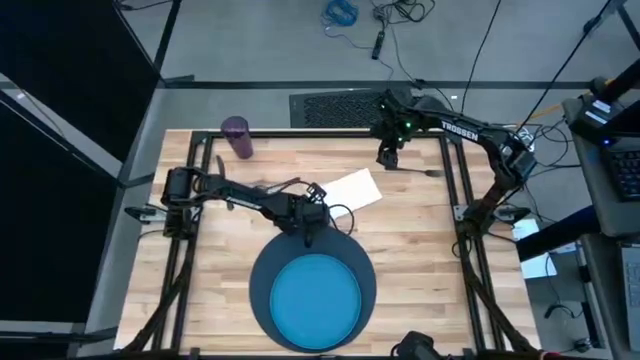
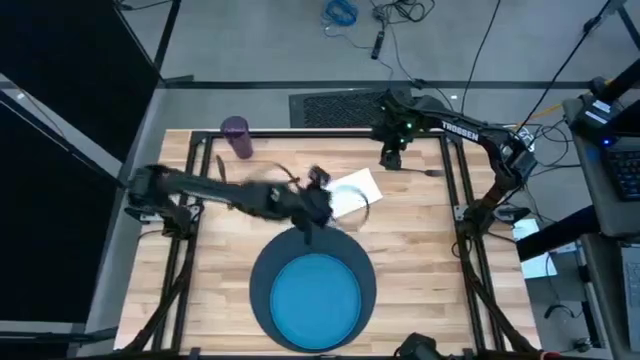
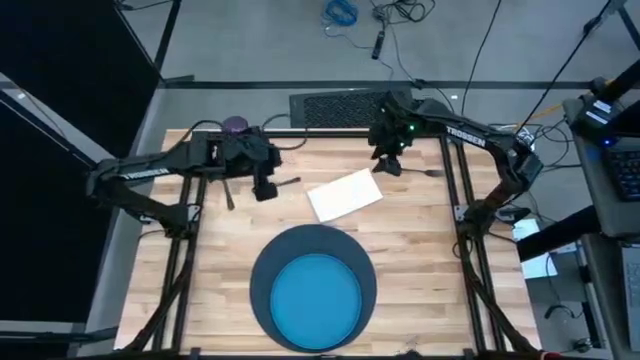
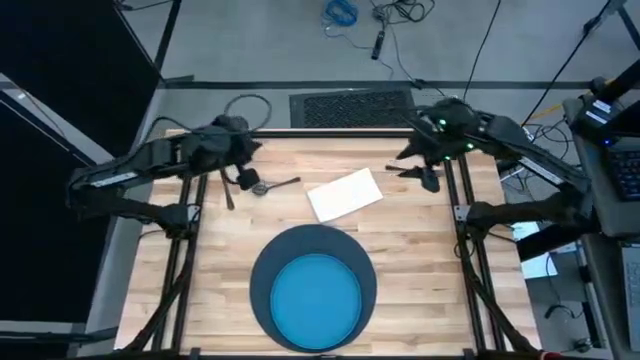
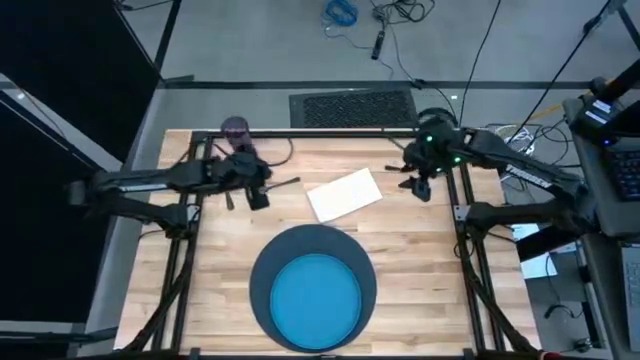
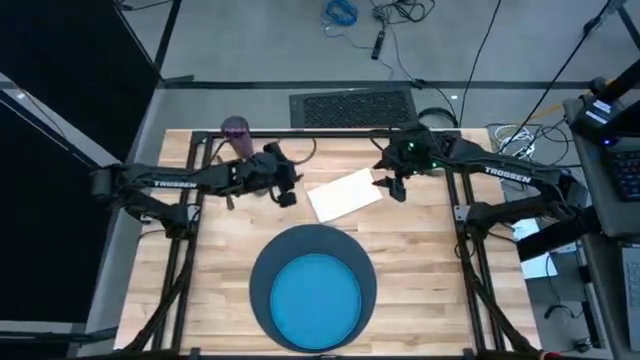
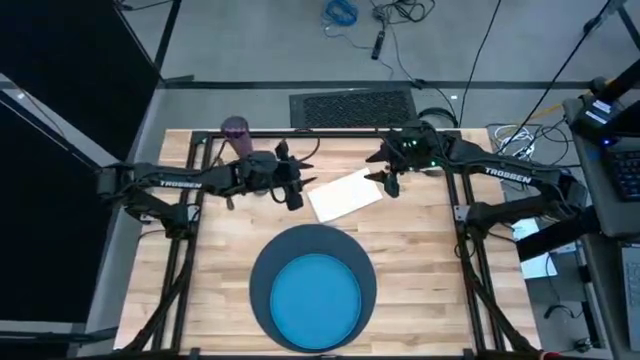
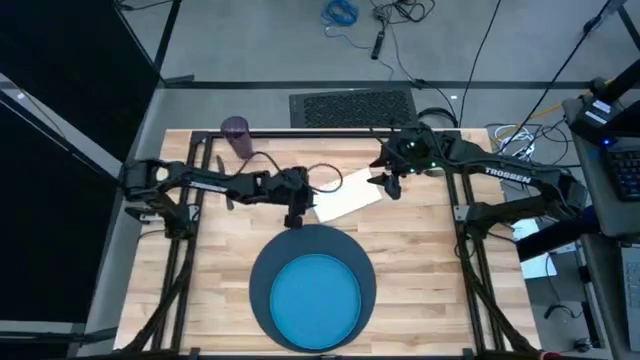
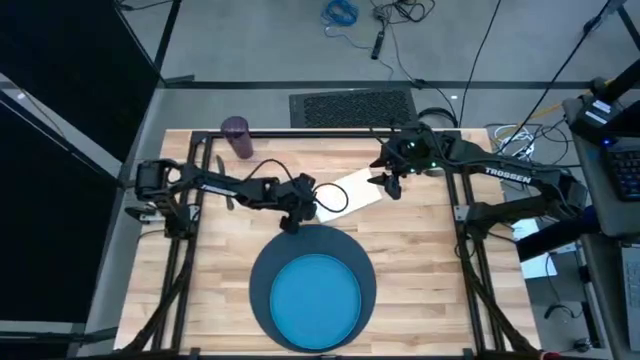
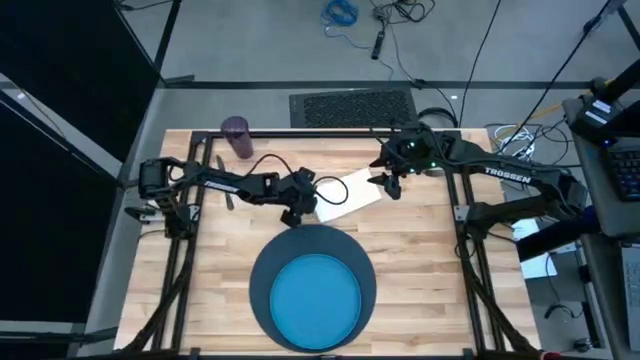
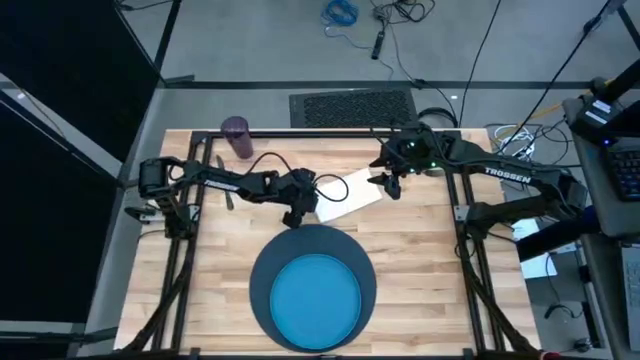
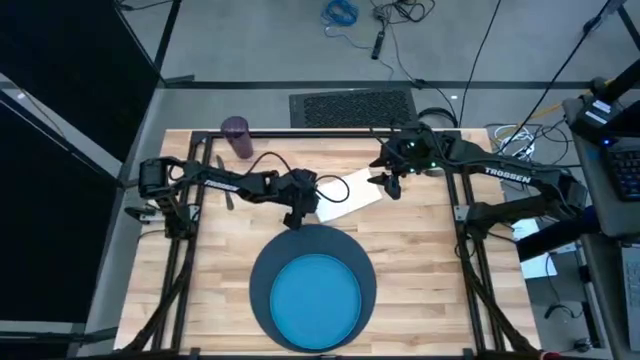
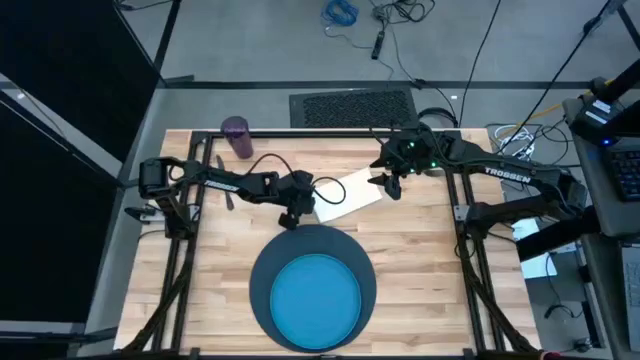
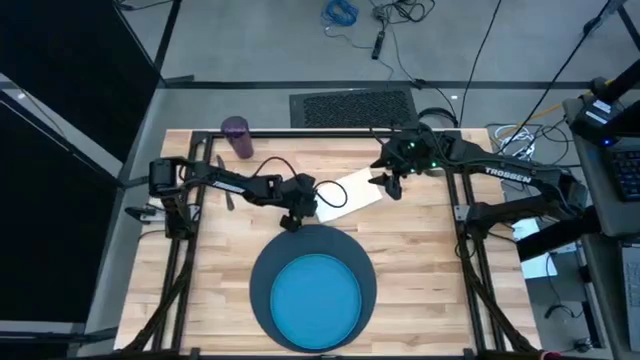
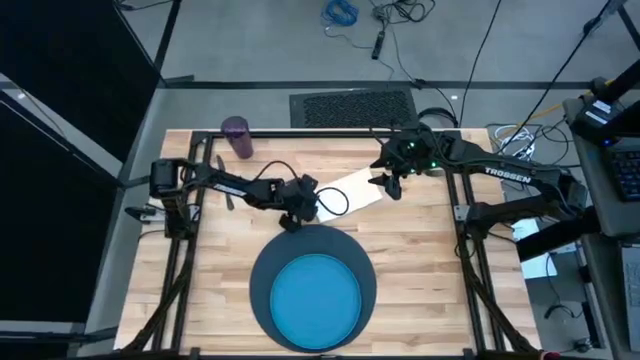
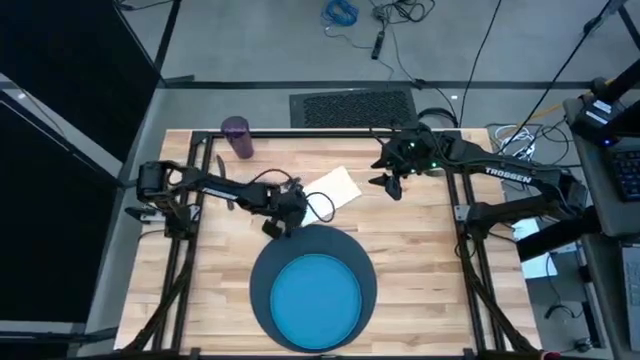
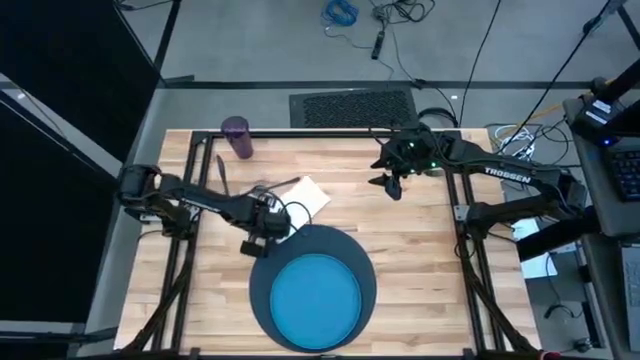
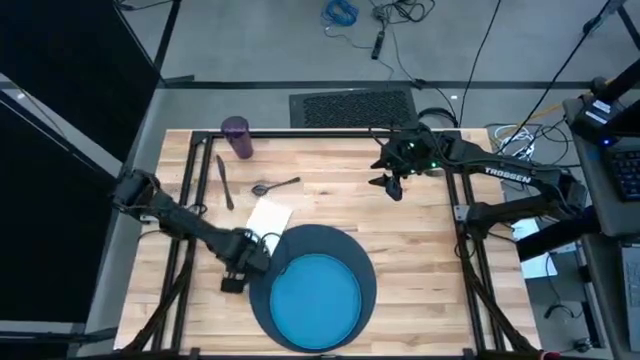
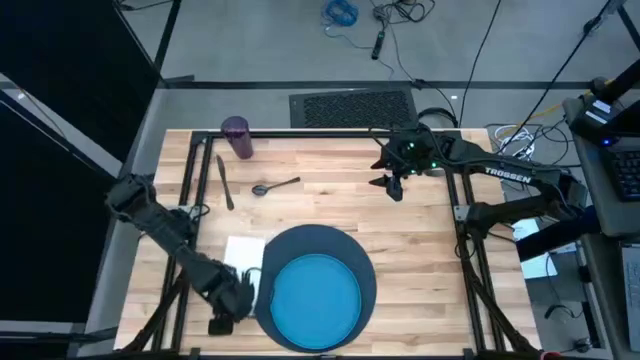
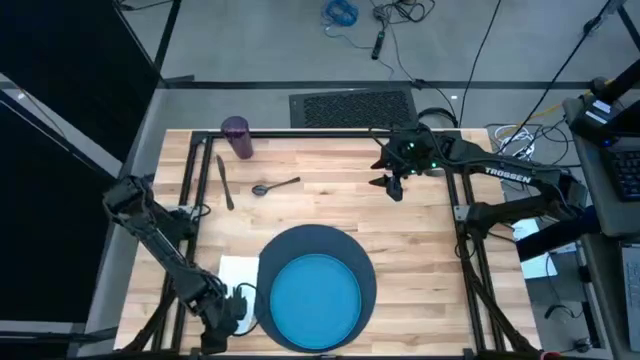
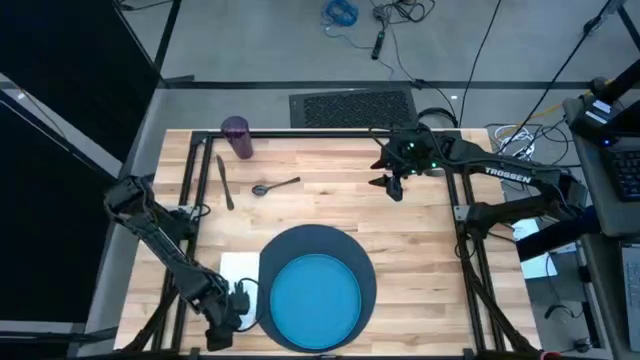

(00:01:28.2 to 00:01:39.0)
Task: Set table place
Move the white napkin to the middle left of the table
